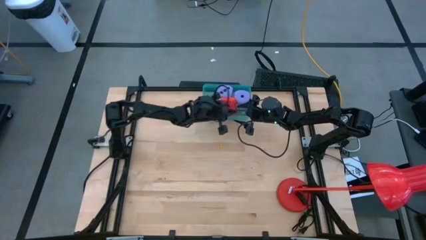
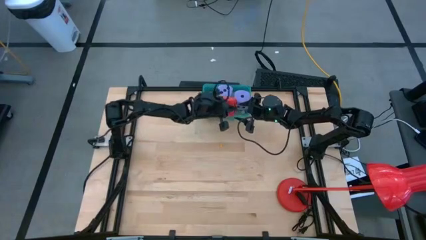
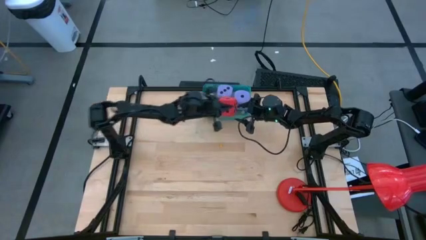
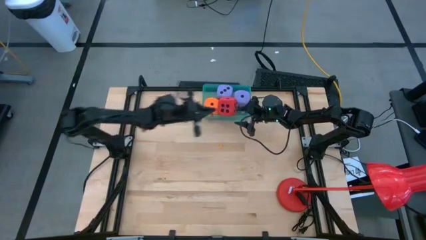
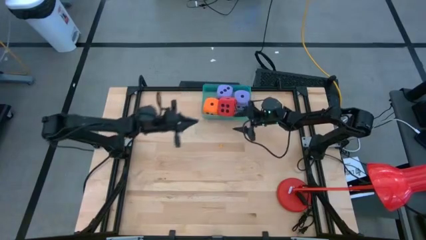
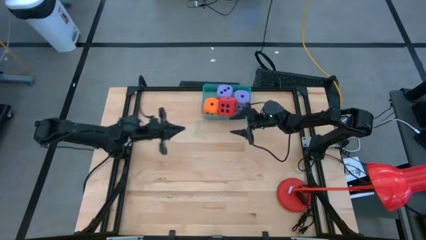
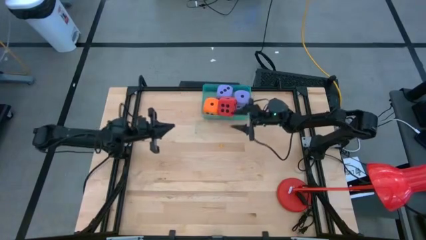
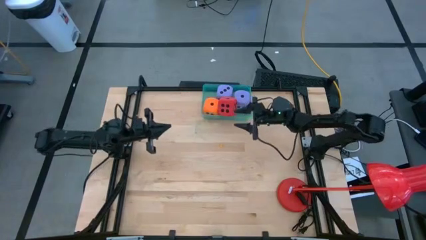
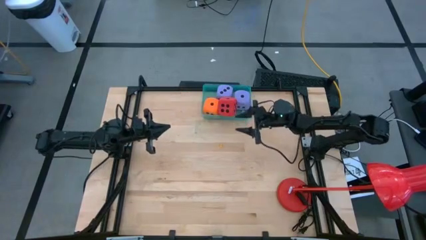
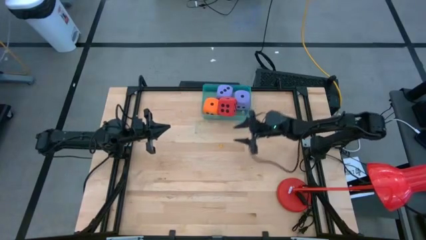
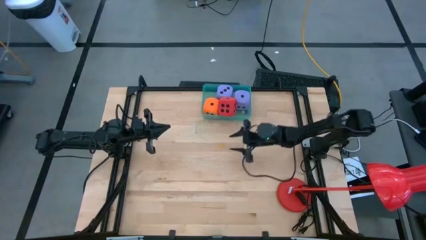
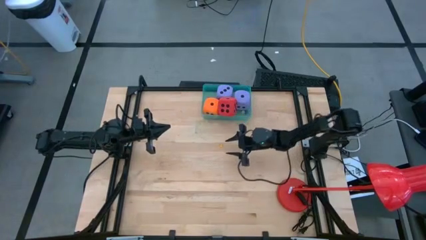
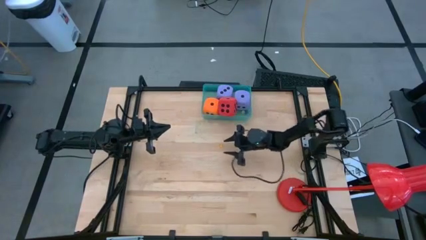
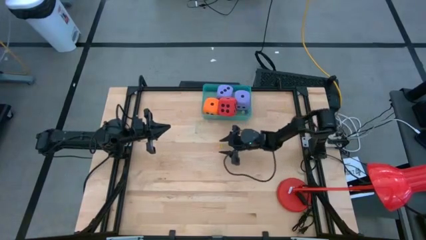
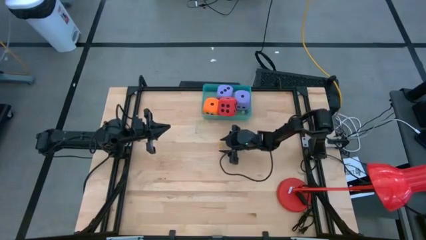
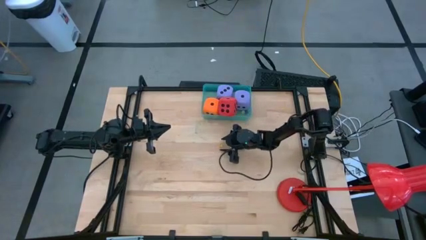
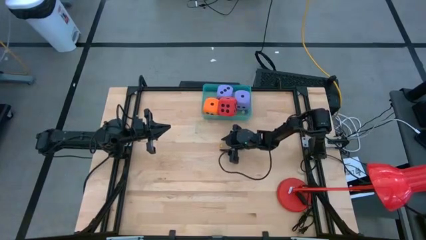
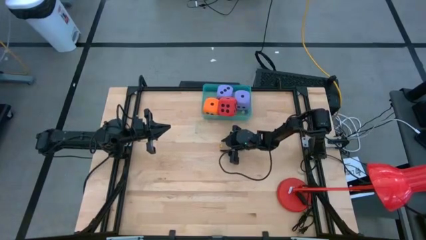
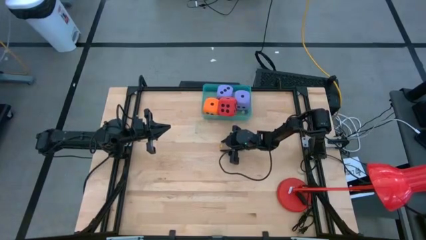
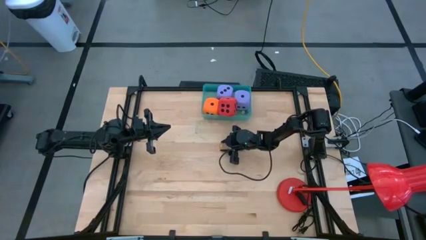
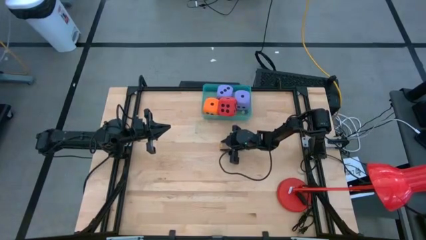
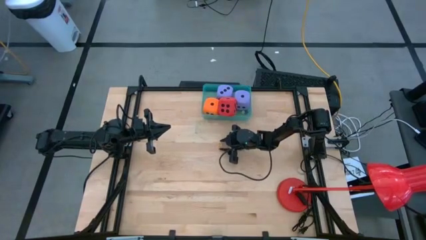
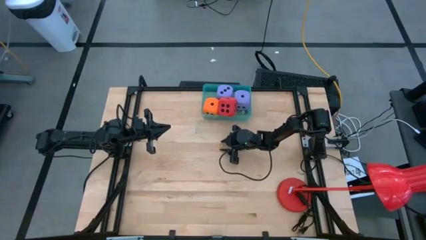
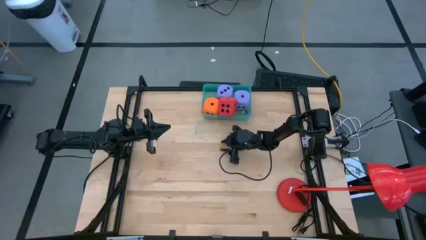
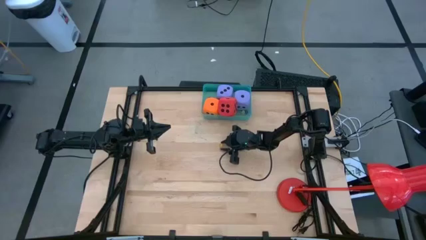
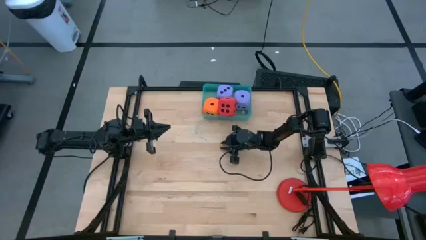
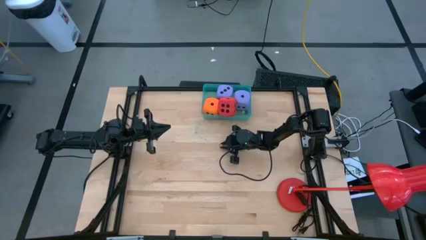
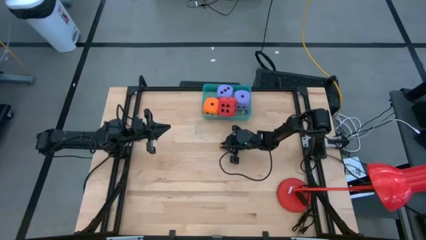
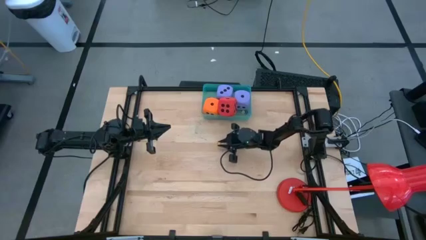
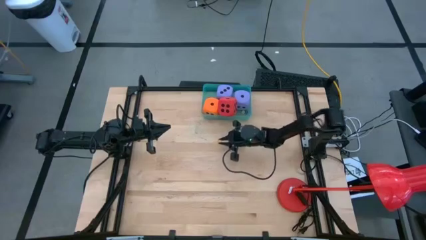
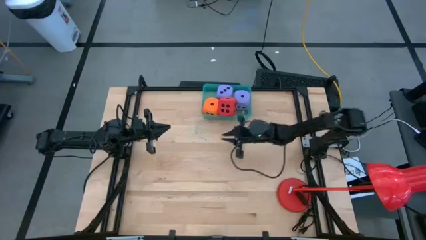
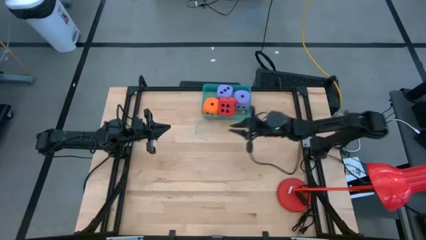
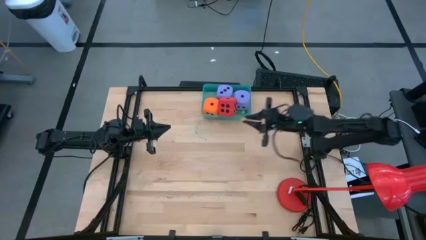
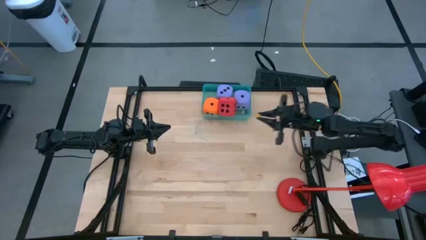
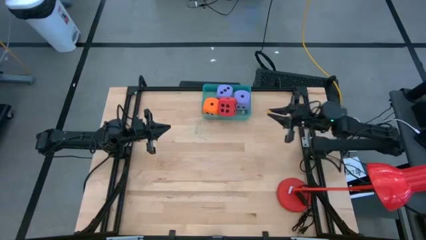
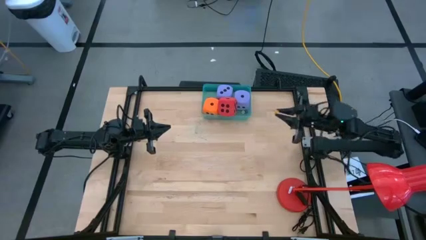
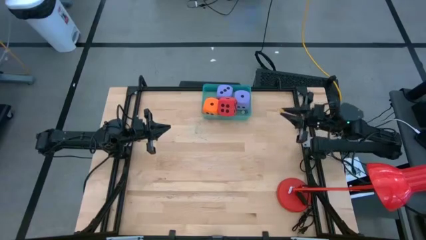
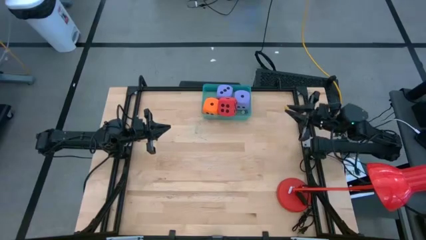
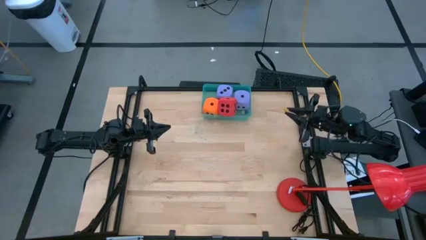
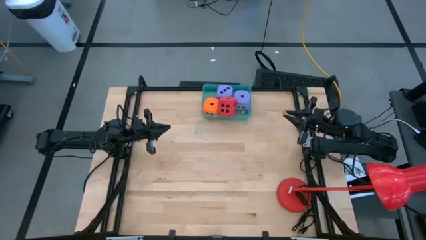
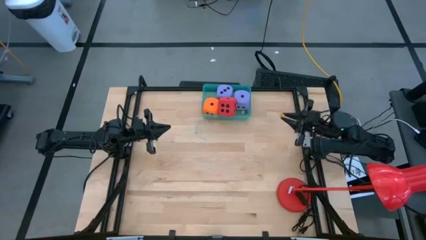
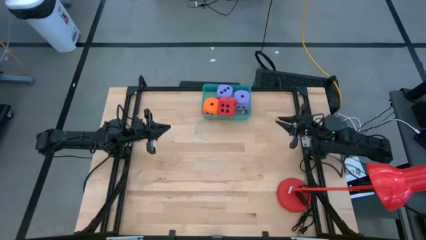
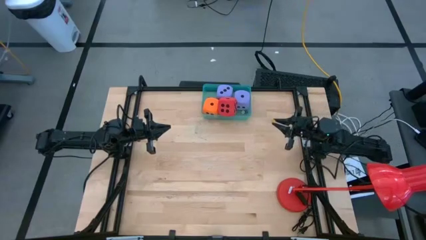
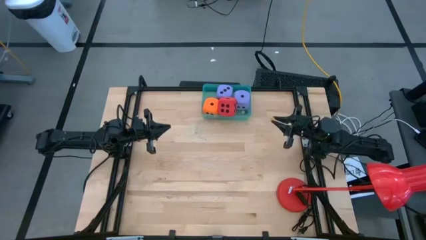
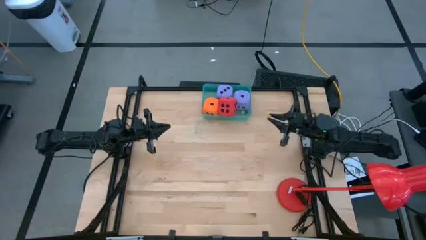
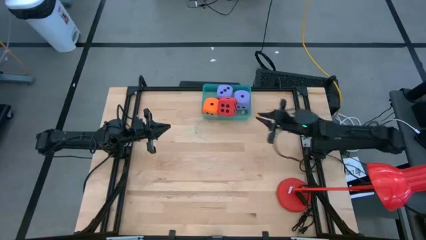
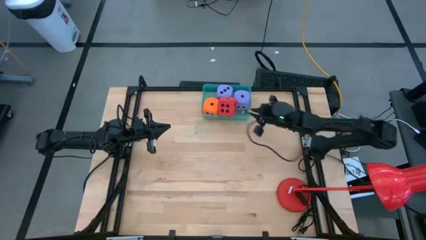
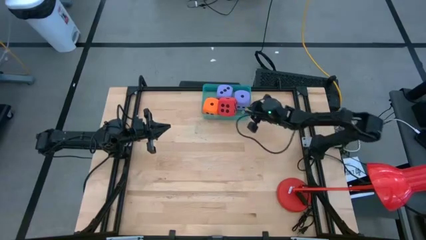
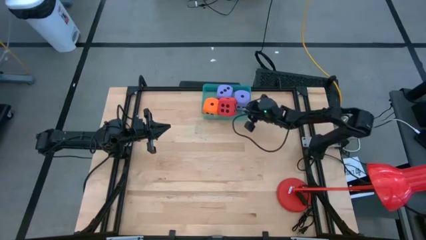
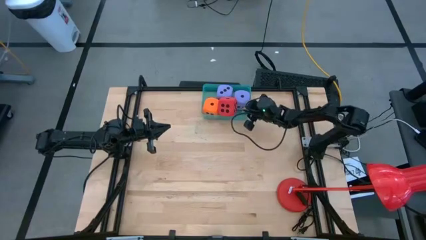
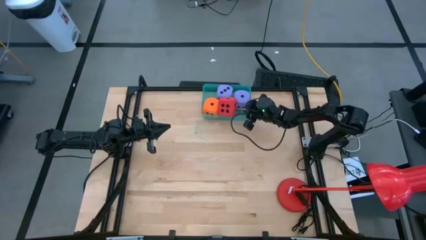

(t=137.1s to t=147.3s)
Task: Pick & Place Dice
Put the small yellow dice into the blue transparent bin

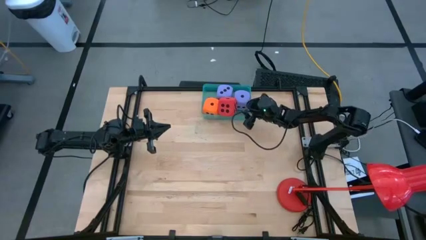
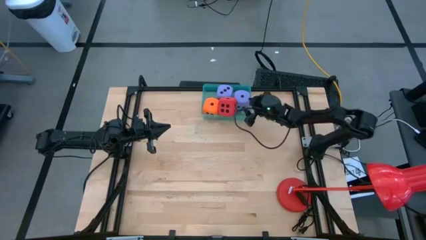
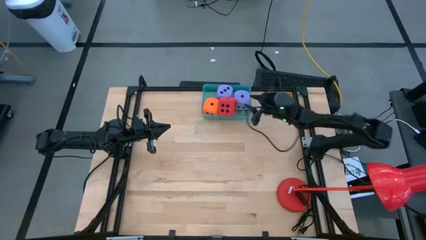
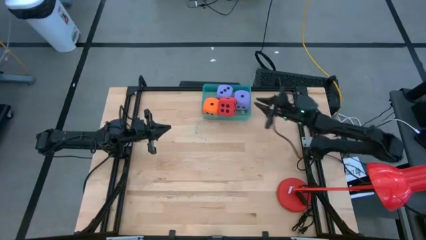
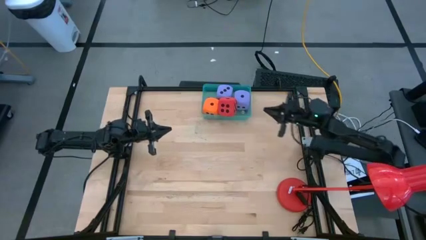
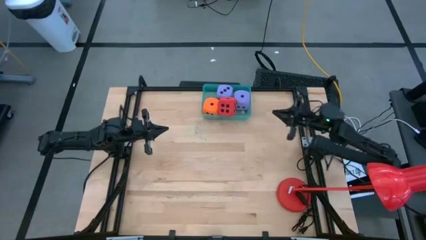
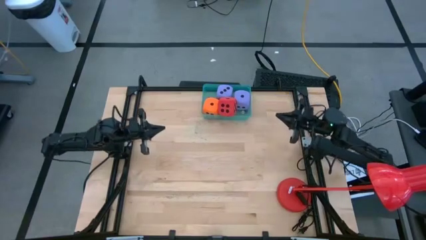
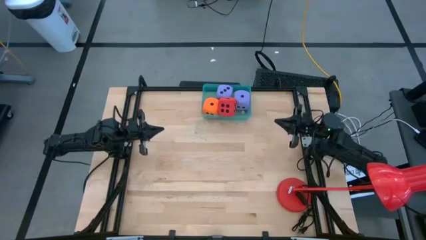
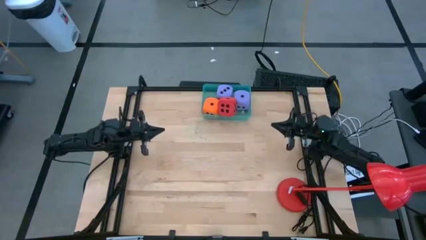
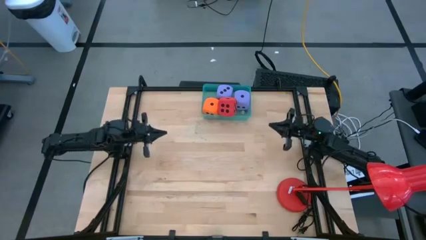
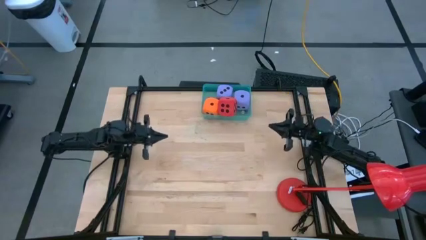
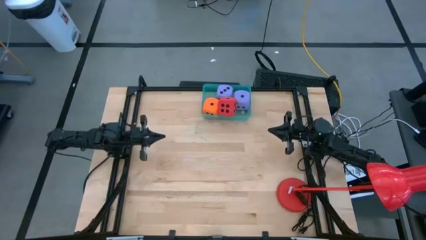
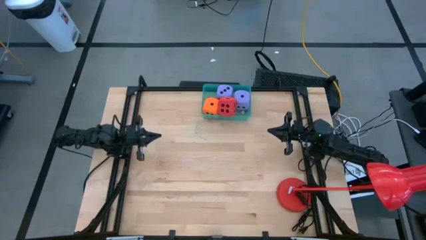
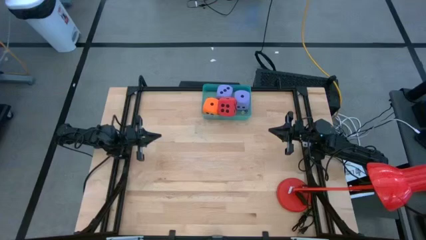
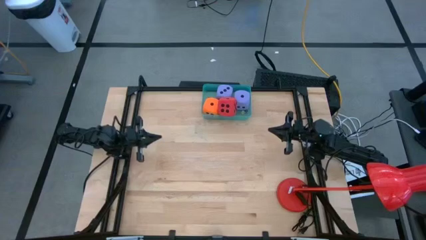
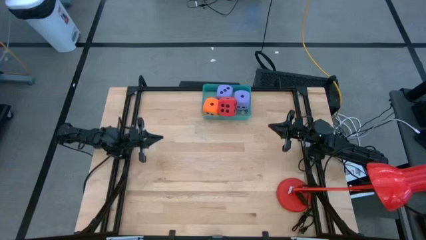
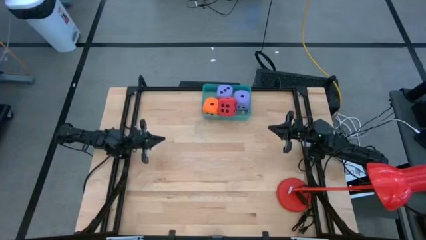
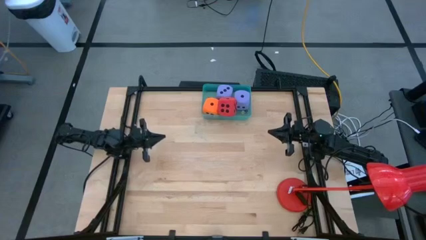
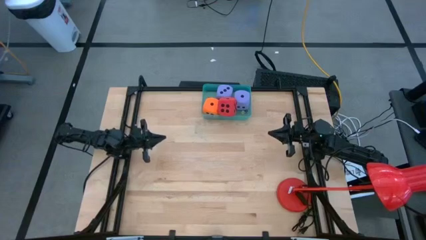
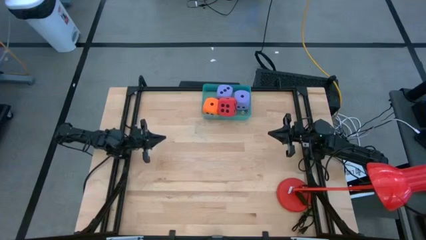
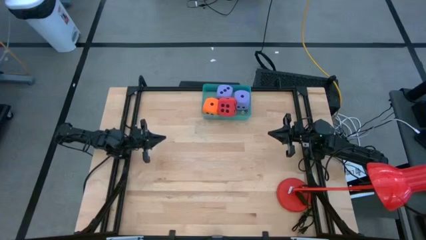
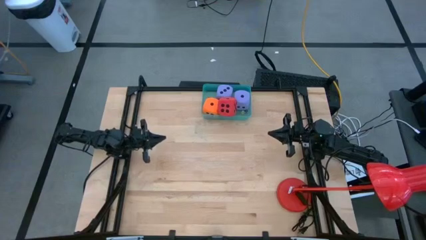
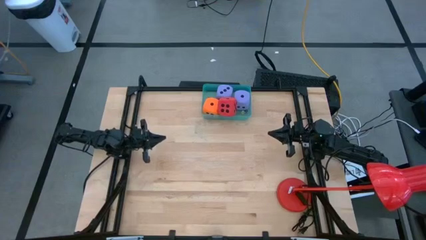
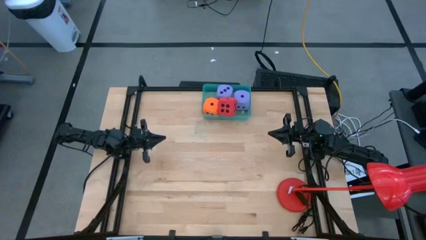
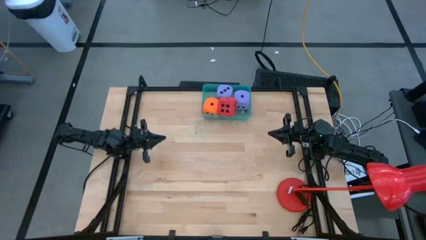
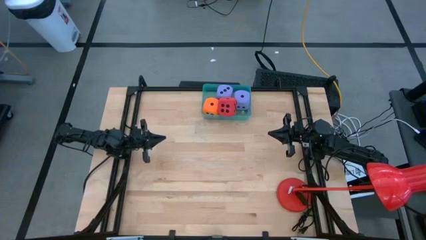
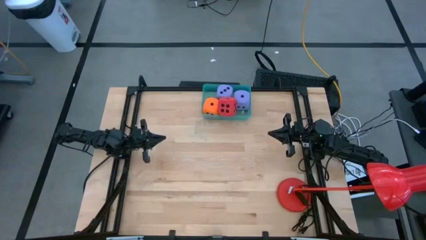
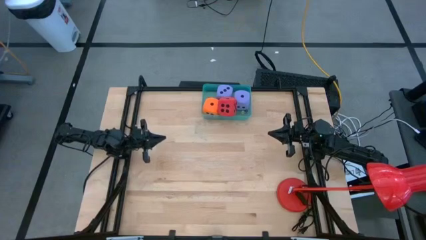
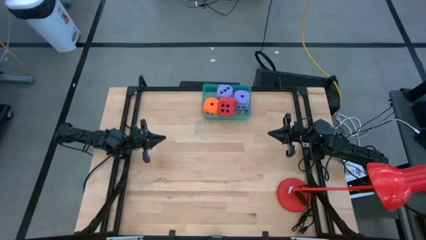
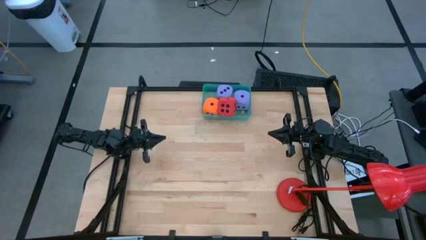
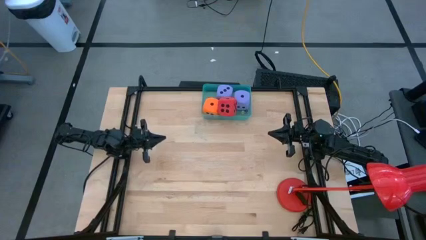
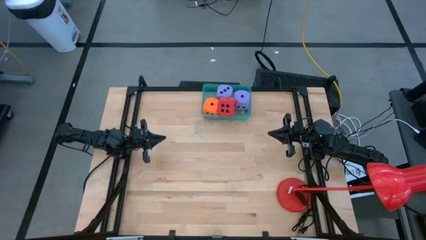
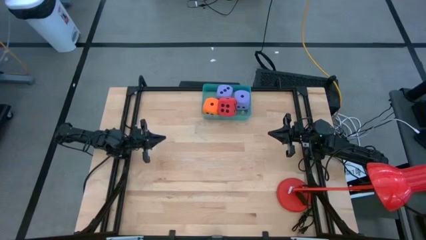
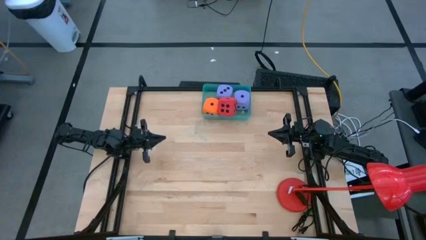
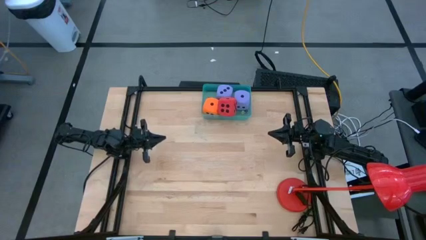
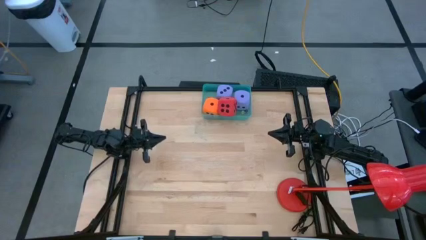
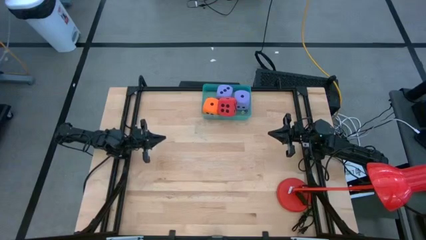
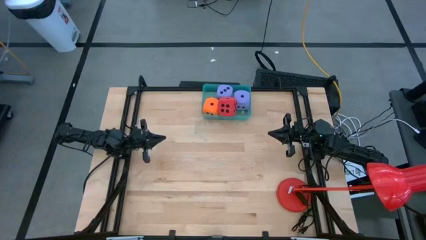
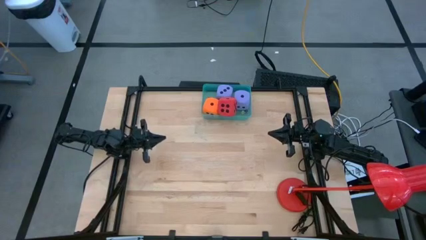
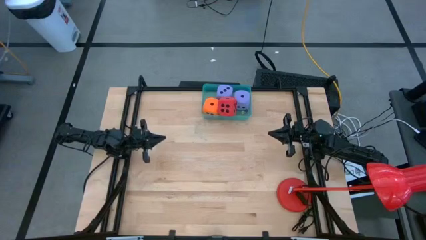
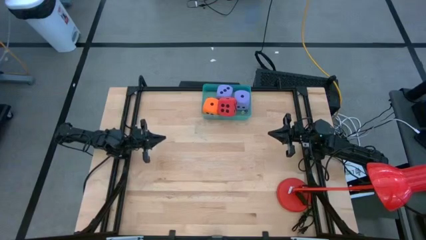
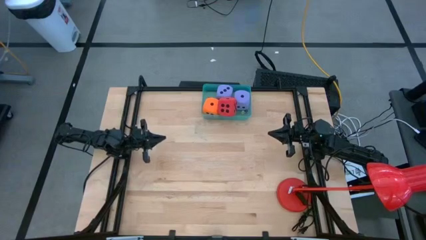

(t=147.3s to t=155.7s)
Return to Home Position
